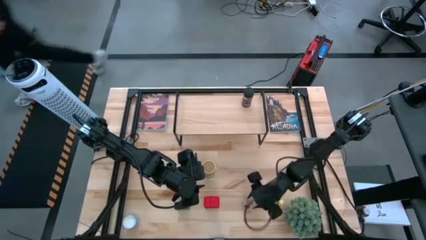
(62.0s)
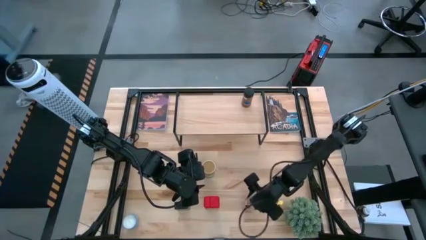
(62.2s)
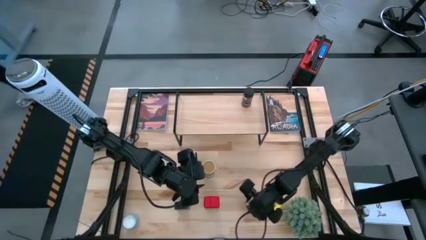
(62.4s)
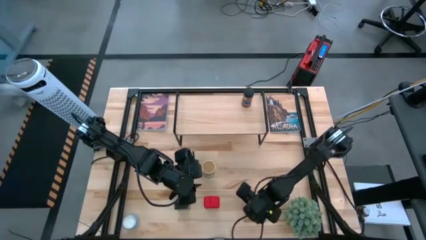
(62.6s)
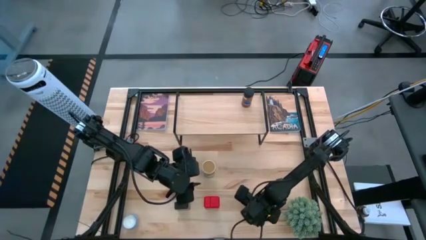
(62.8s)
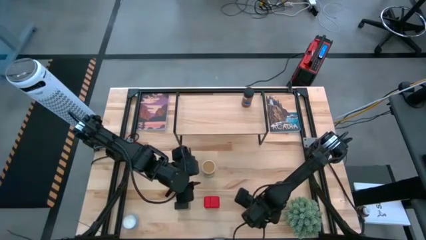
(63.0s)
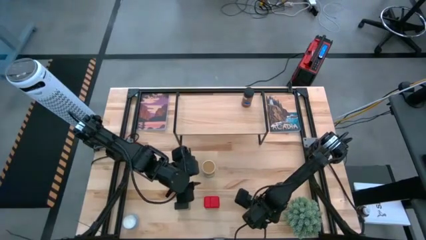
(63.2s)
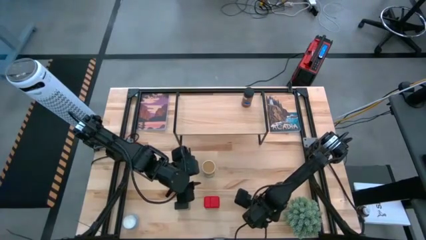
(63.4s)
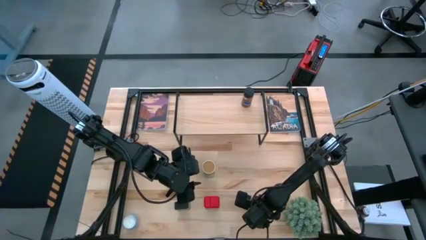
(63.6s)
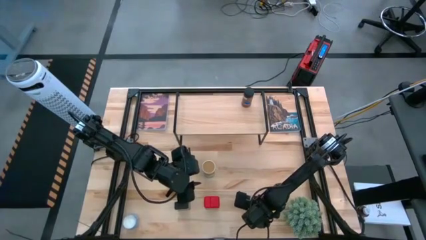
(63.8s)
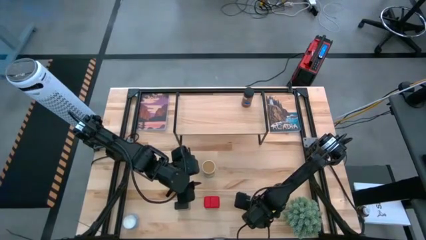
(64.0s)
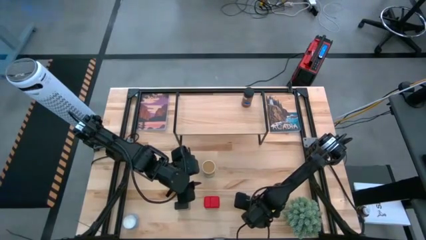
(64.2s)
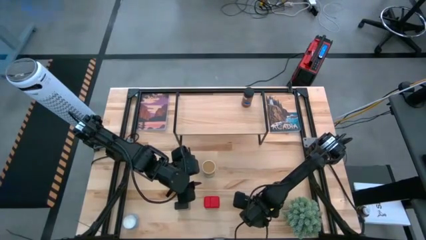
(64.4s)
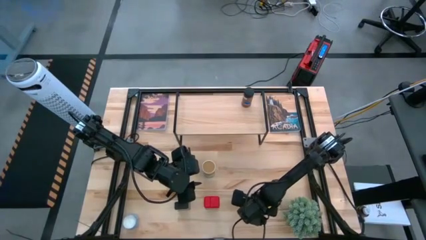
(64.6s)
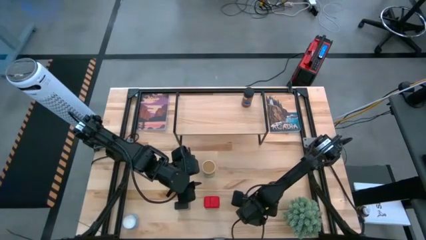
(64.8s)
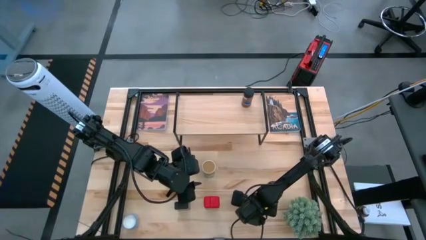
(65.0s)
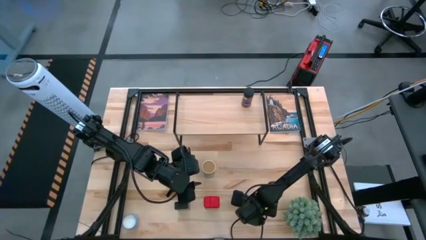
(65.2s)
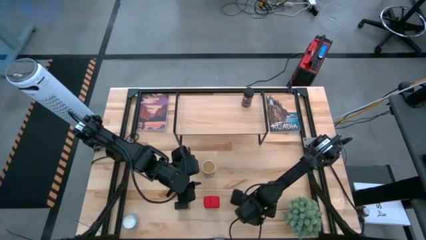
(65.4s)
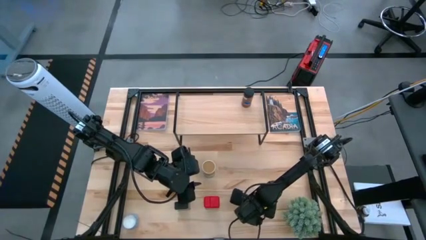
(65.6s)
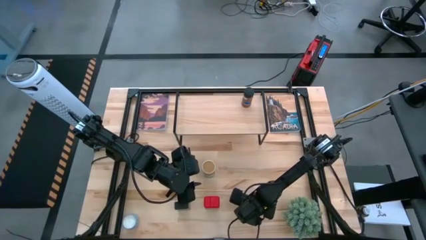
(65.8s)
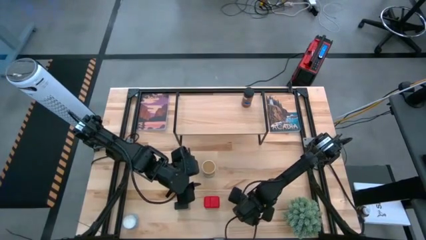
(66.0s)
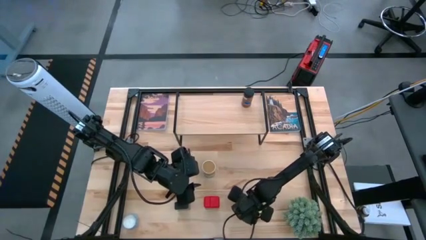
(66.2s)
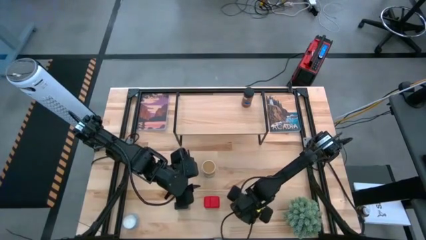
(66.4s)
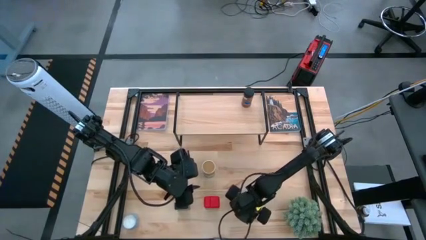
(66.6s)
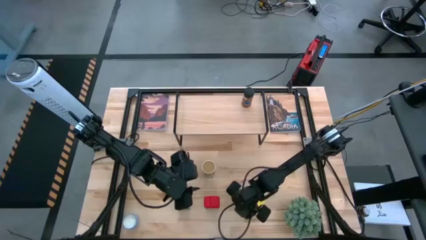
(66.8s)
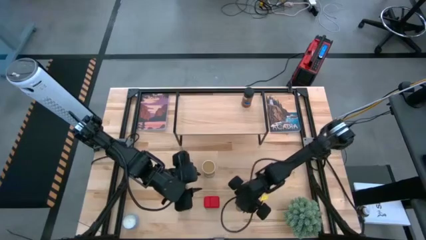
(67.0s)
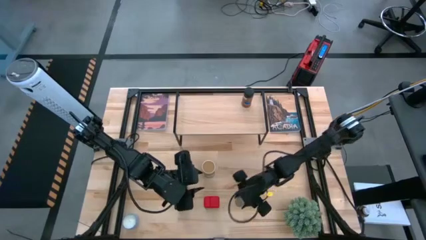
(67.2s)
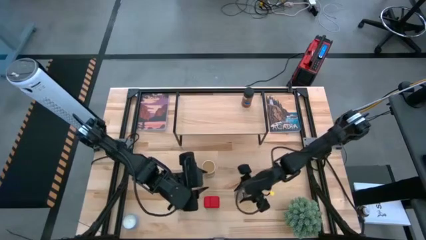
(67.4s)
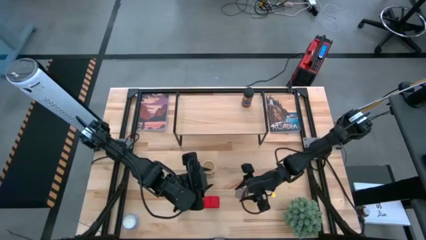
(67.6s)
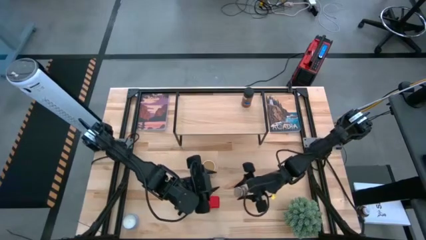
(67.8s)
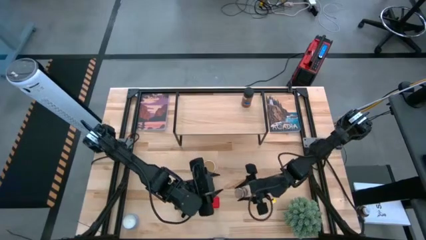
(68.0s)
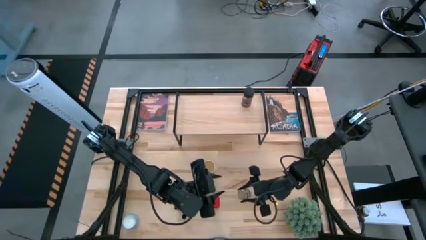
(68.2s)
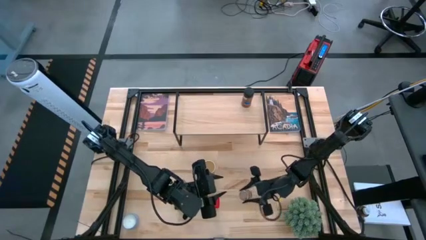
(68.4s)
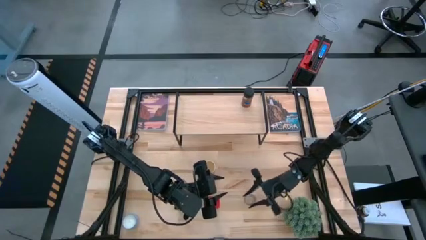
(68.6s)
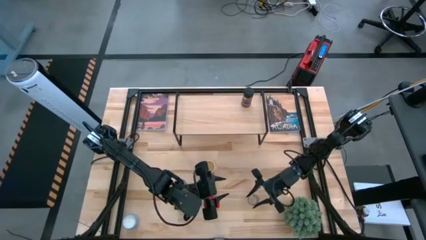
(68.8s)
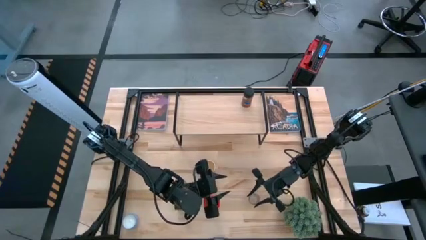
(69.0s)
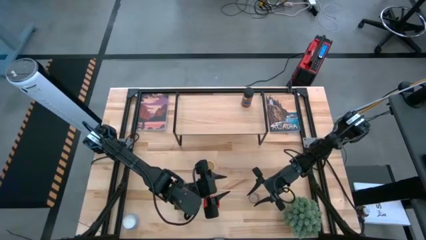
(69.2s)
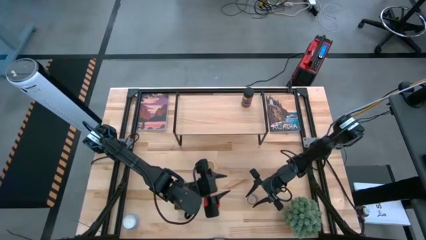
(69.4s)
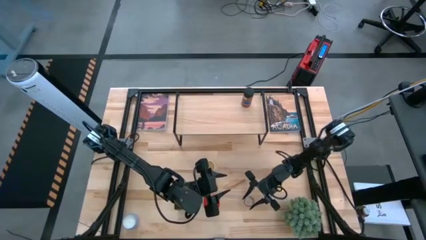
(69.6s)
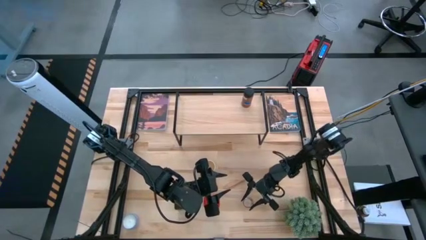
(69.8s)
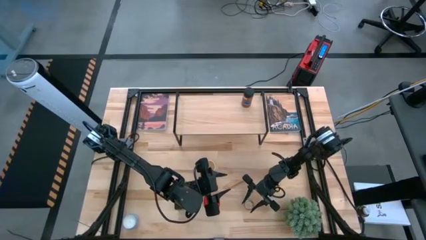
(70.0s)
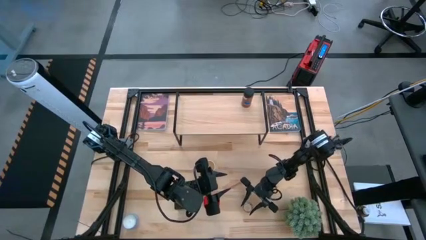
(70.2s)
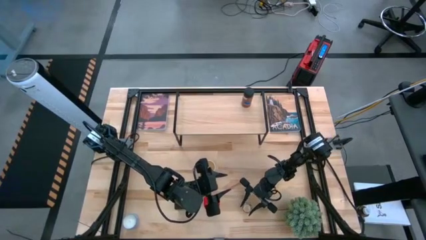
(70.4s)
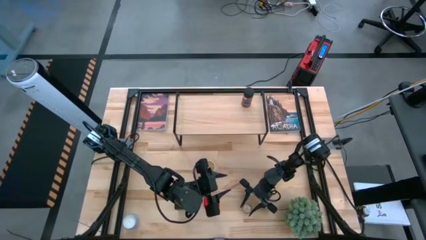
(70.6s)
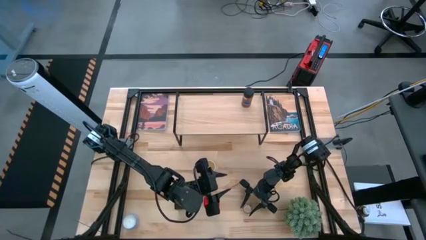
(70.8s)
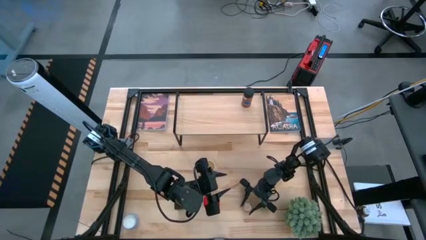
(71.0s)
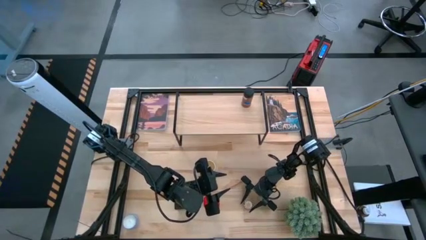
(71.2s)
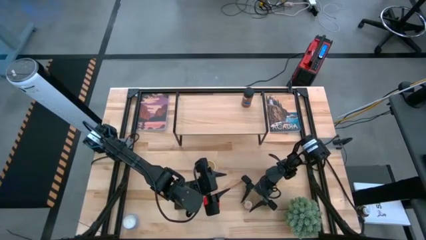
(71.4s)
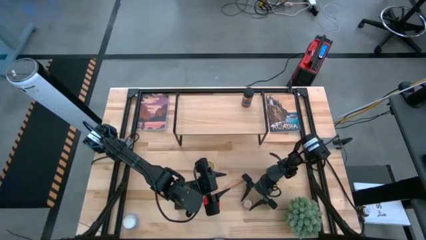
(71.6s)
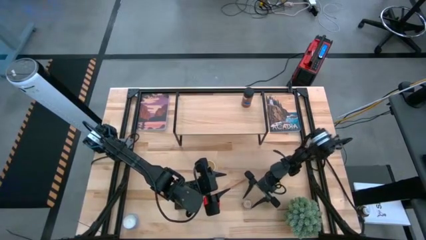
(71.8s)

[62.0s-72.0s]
Task: Shelf spices
Remove the brown seasoning bottle from the shelf

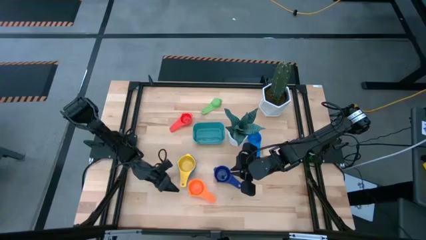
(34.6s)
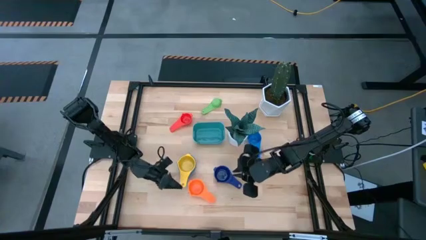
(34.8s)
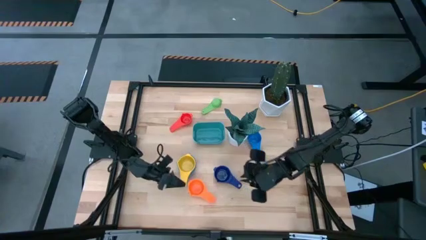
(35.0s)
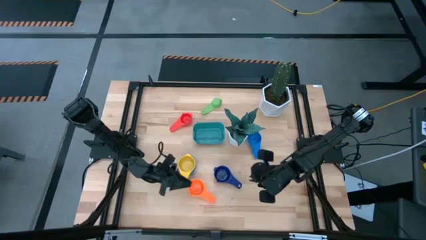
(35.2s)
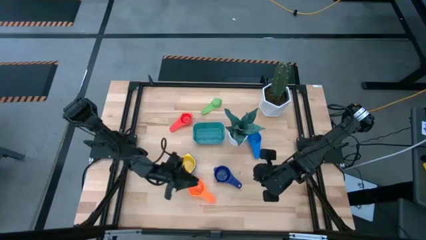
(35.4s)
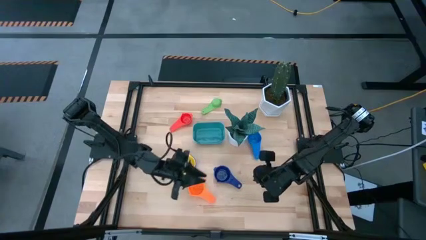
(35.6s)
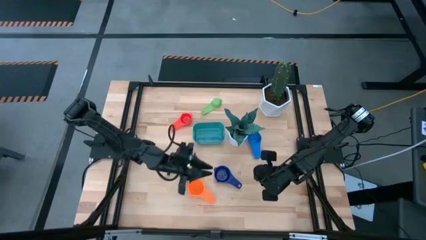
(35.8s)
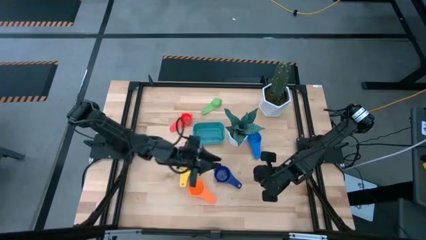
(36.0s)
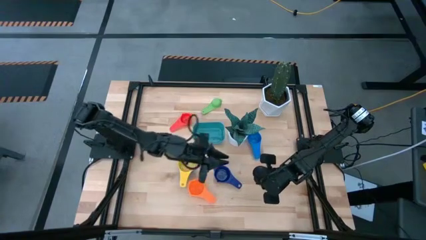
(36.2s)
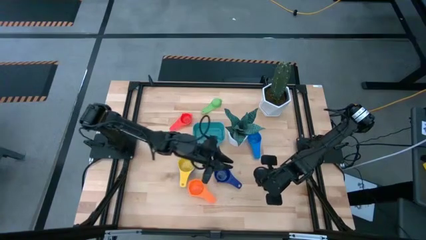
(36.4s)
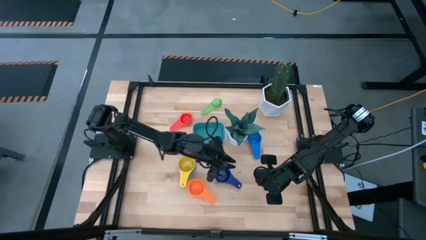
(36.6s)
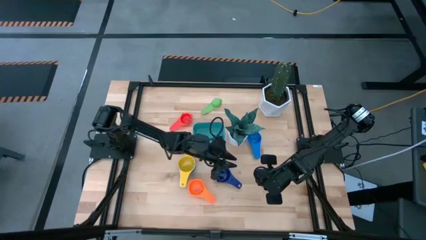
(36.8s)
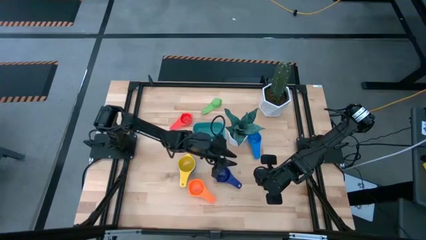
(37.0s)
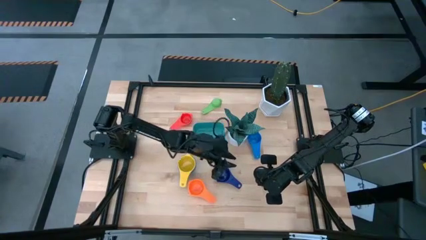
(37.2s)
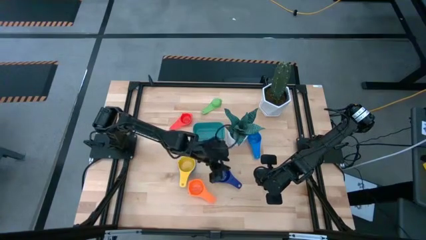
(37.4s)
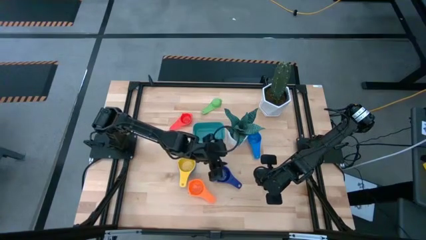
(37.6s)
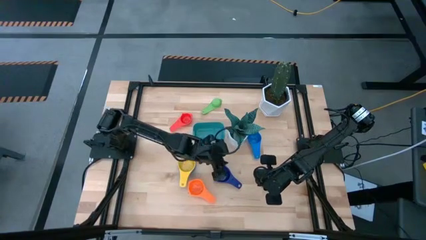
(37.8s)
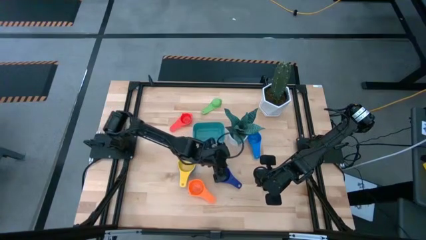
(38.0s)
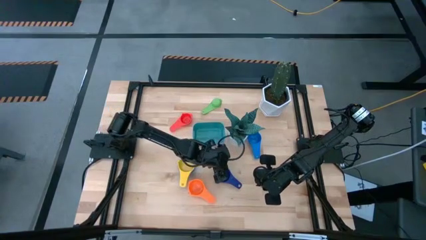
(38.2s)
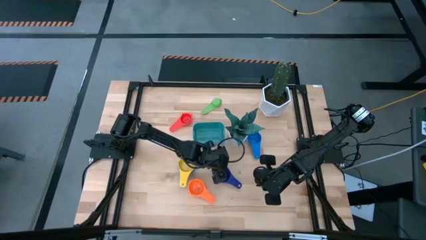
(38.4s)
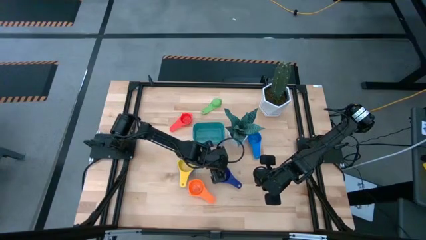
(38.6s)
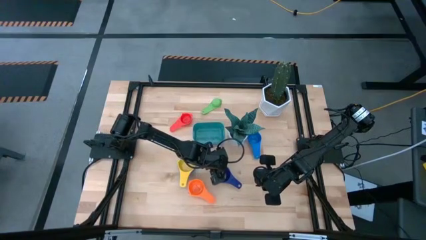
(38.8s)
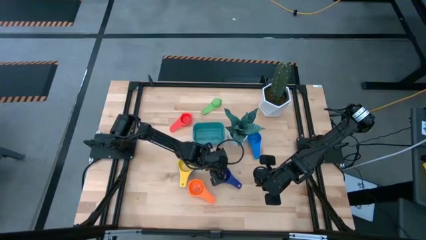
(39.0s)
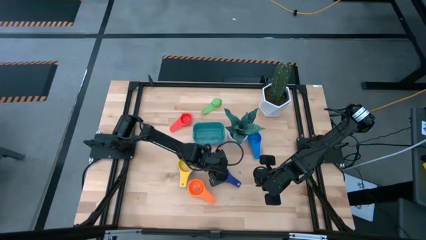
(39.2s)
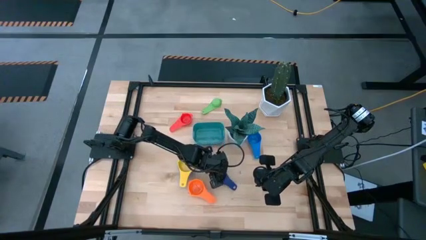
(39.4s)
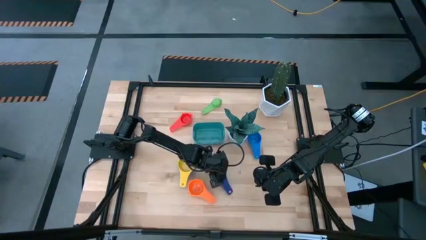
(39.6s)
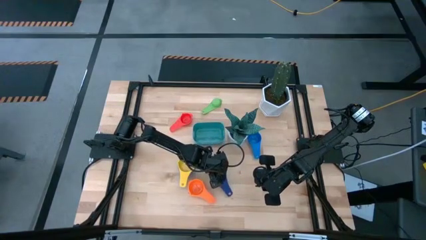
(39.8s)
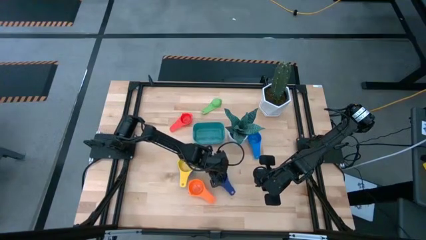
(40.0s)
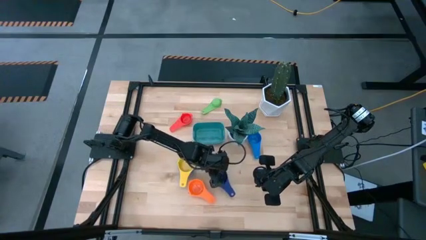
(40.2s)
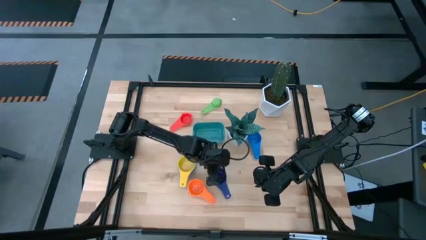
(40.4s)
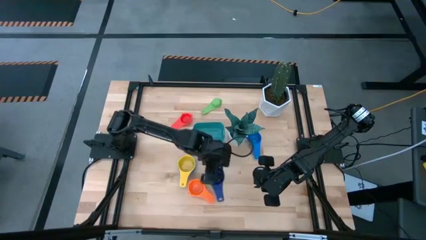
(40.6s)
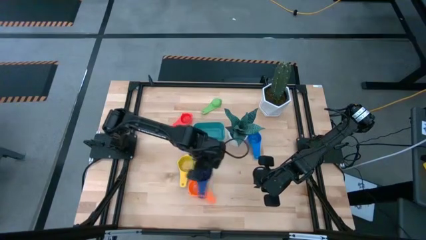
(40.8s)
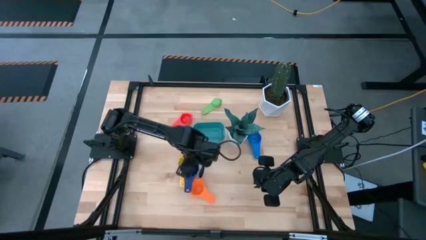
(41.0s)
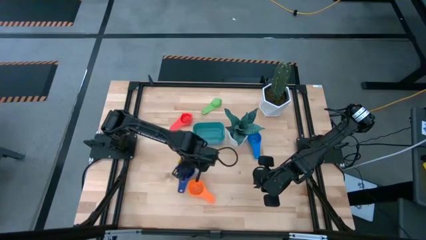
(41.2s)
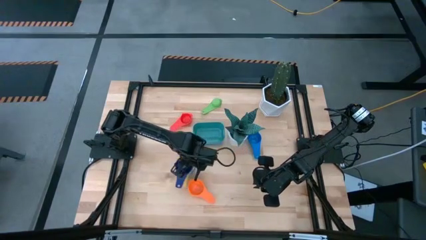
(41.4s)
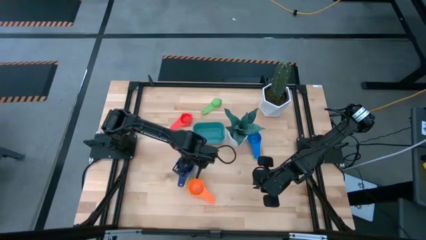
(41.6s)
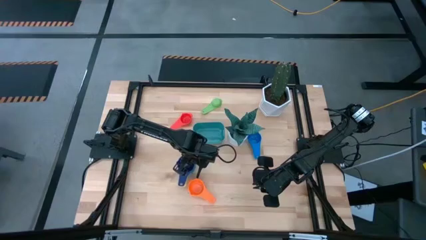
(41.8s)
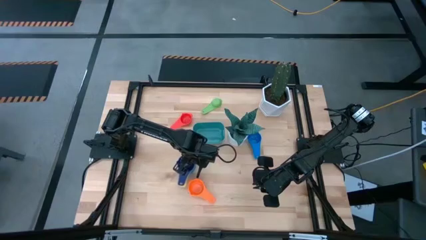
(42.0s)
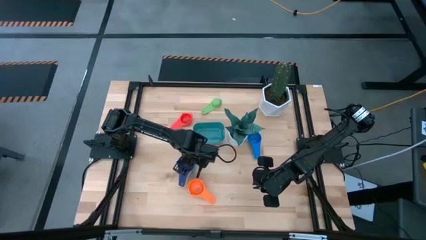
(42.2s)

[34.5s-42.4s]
Task: Nest measuring cups in basket
Stack the dark blue measuring cup on top of the yellow measuring cup
